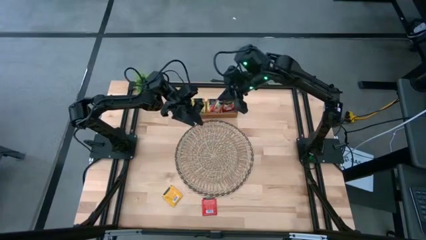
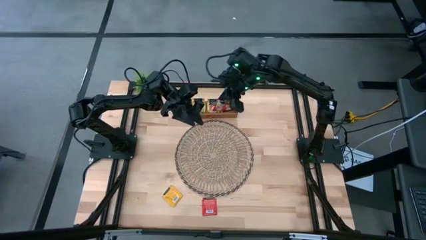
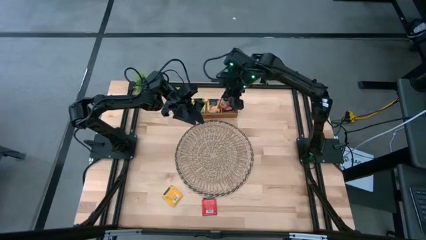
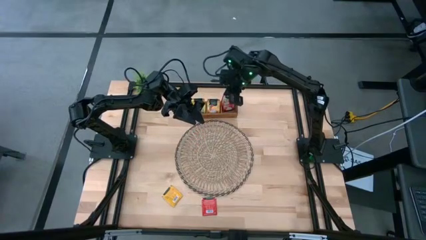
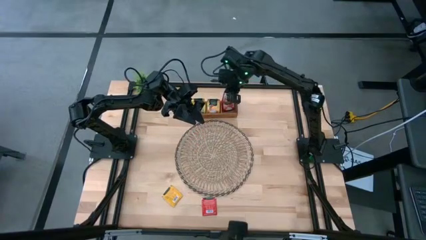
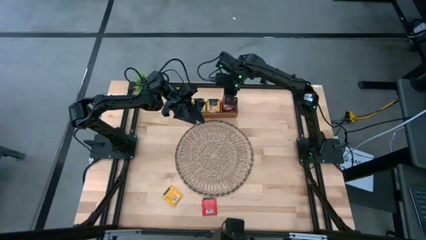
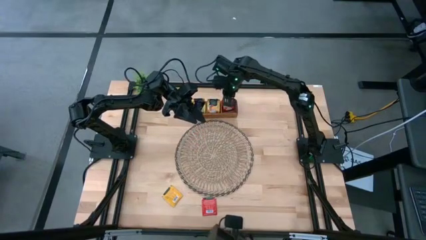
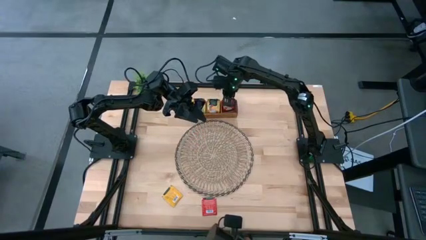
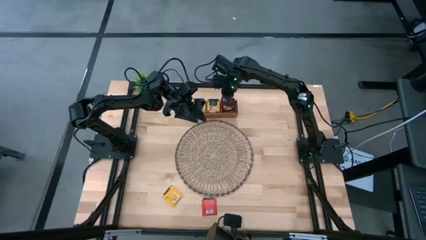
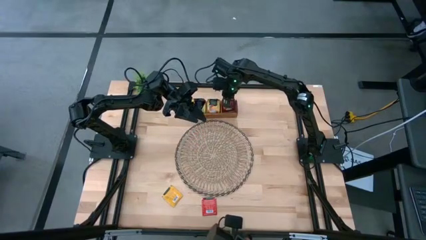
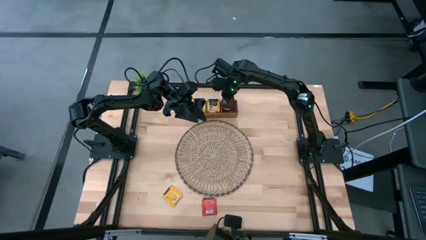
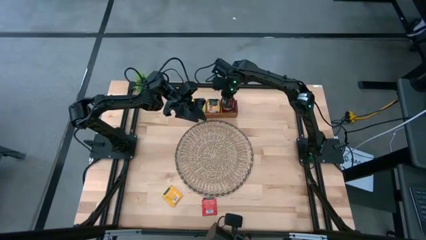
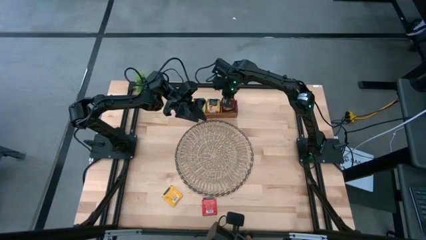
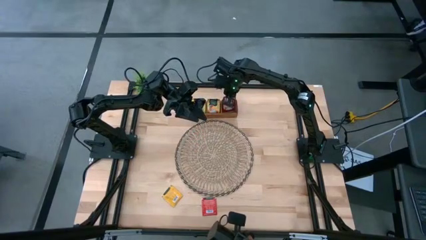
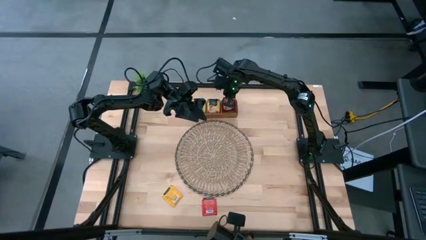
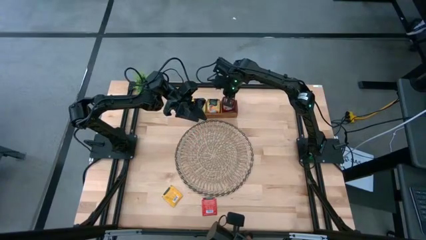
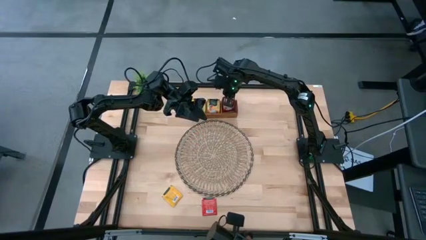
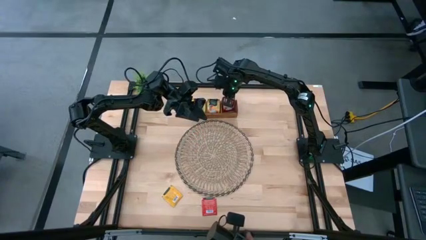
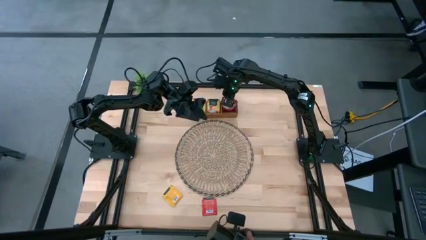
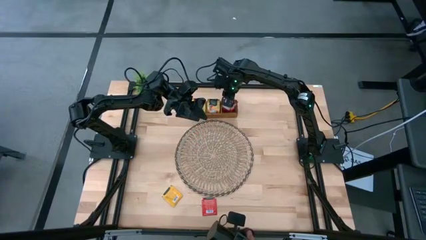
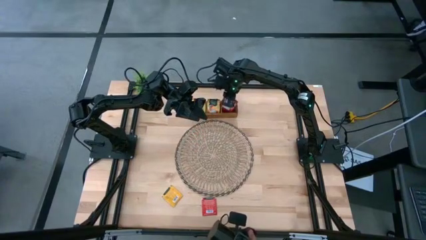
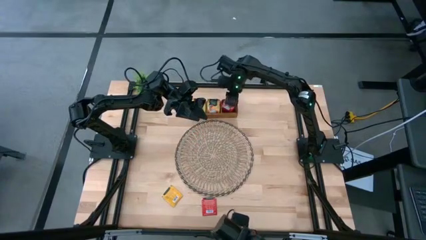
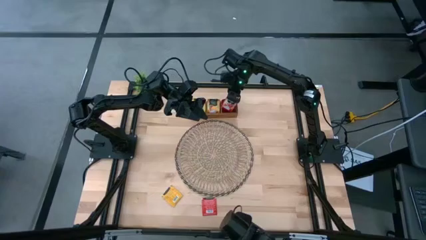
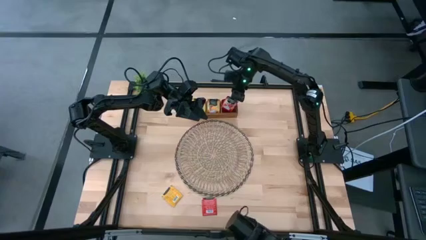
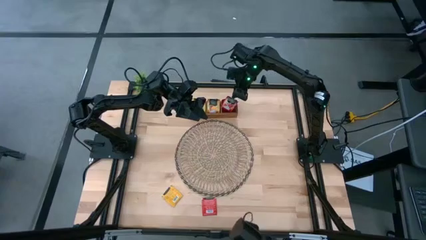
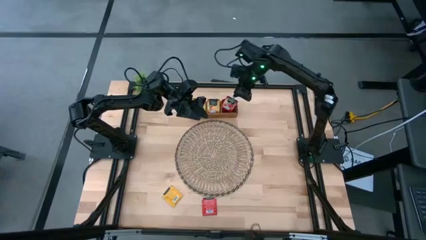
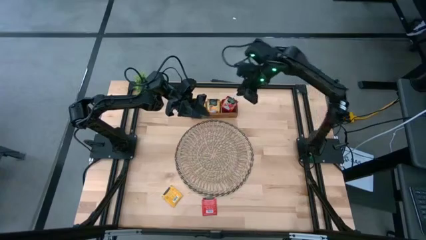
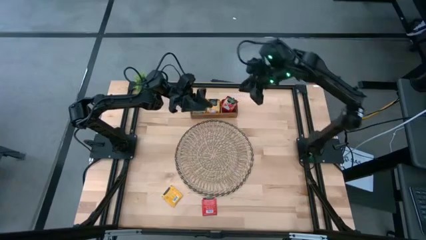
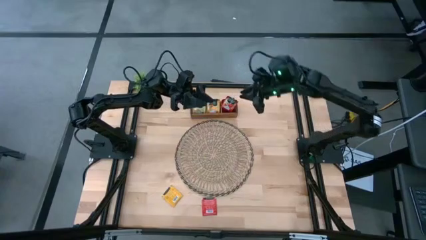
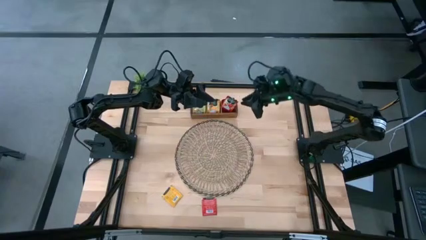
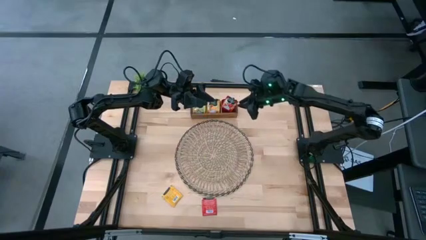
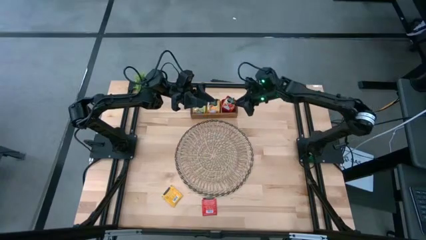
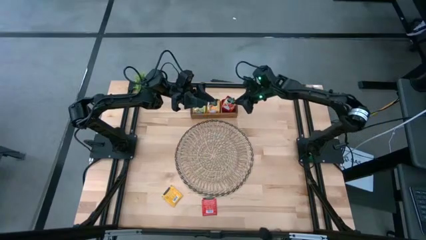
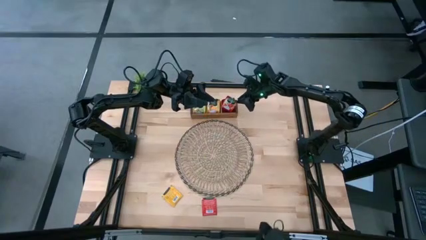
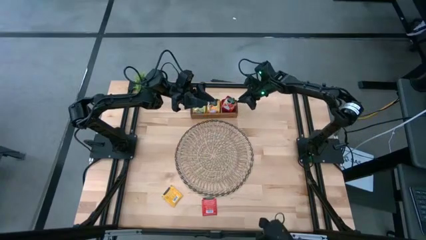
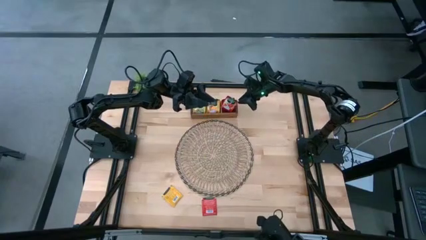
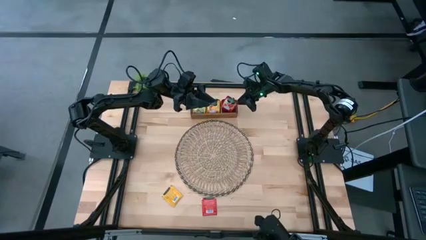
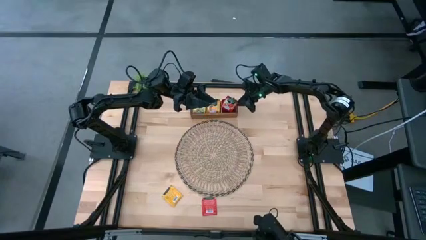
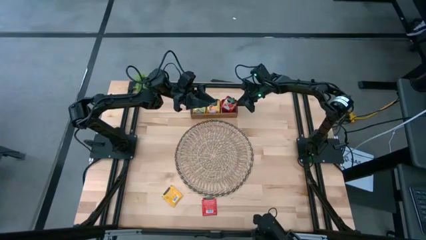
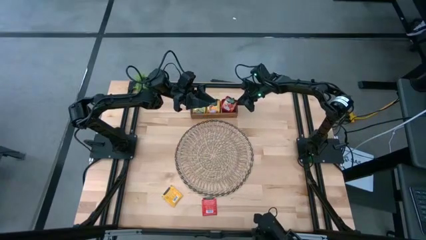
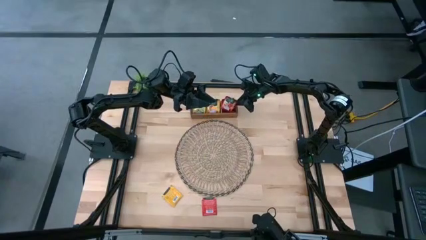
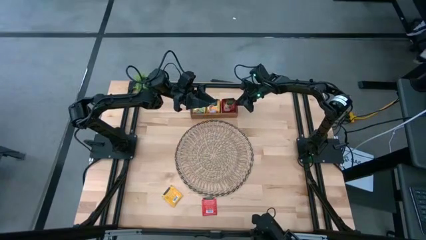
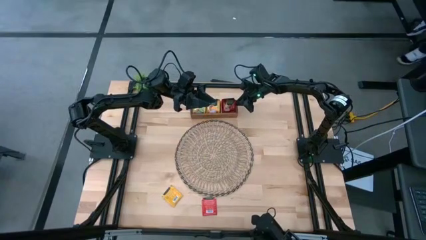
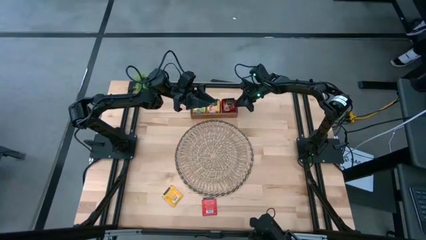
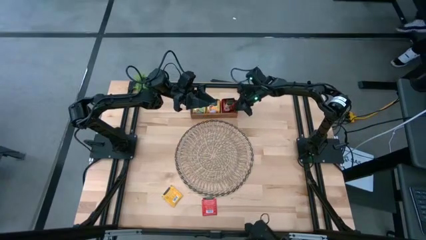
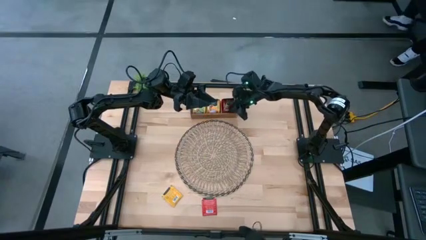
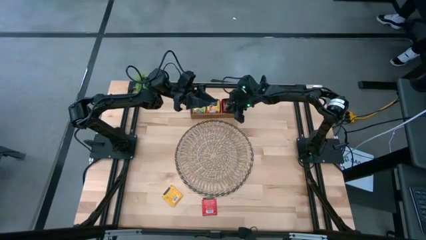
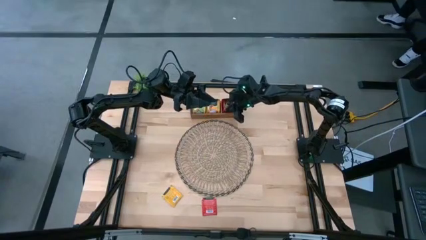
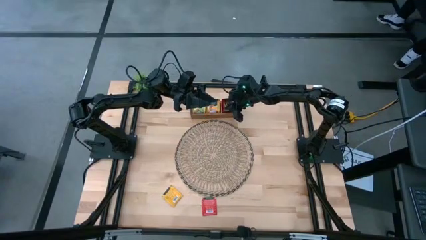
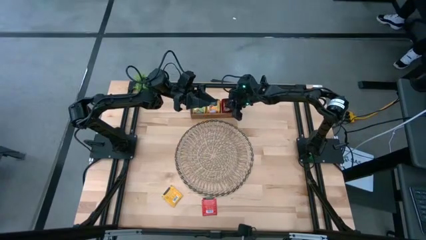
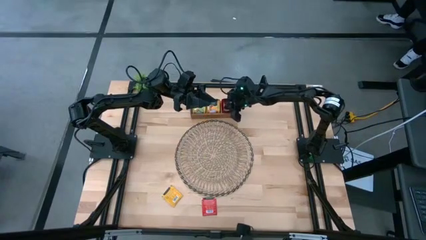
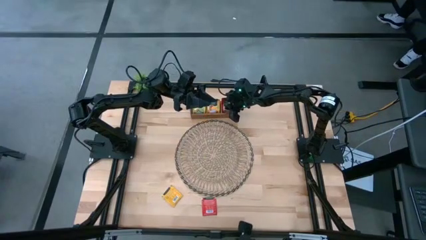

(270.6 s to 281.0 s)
Task: Pick & Place Tea
Put the top red tea bag into the right of the wooden organizer
